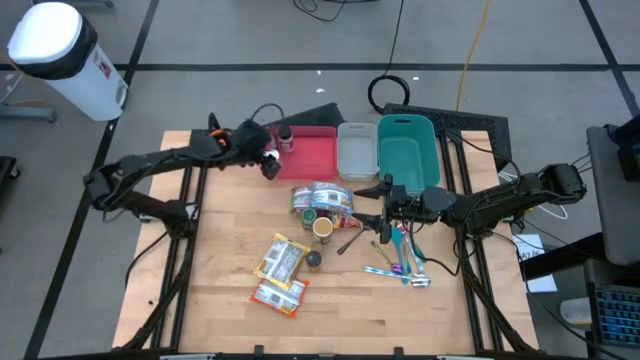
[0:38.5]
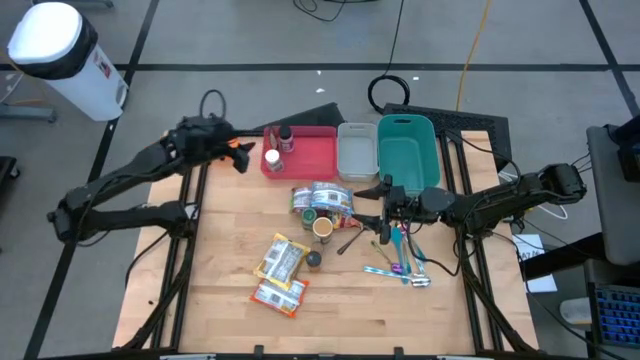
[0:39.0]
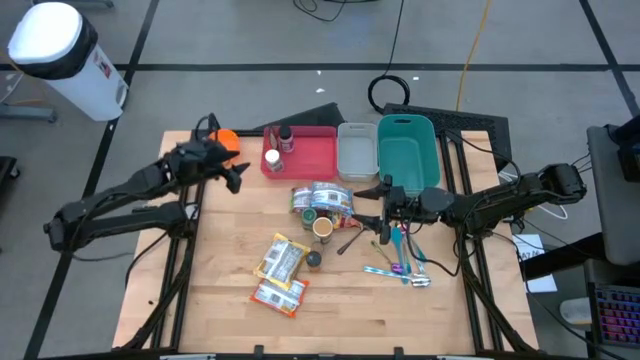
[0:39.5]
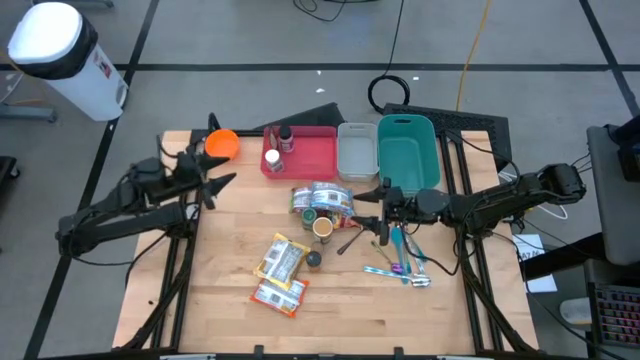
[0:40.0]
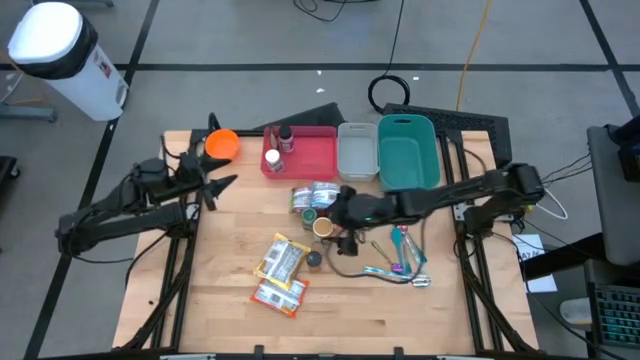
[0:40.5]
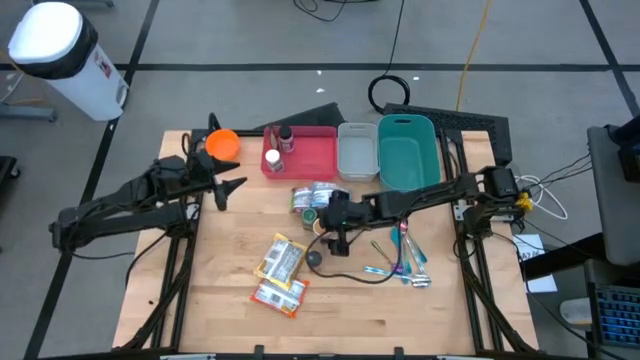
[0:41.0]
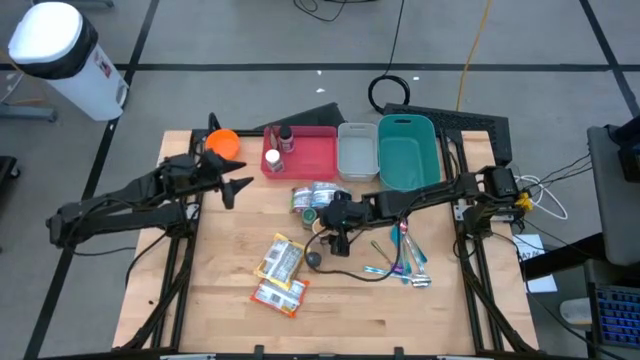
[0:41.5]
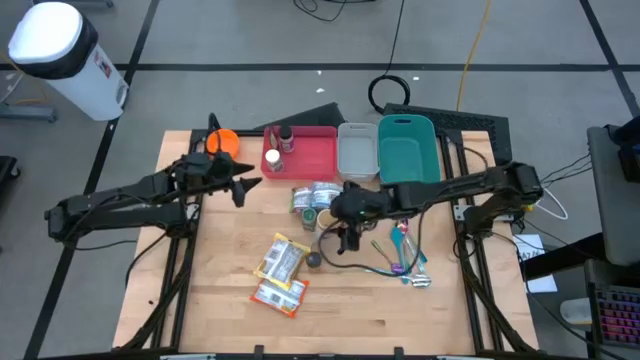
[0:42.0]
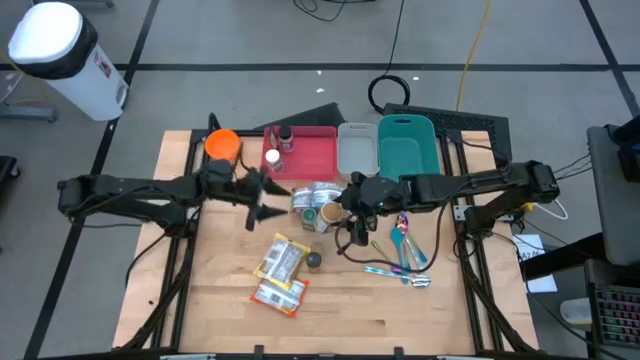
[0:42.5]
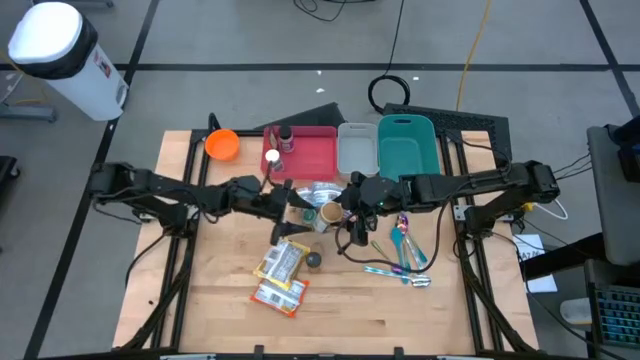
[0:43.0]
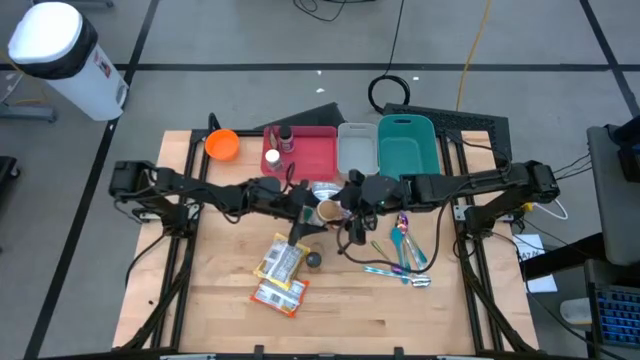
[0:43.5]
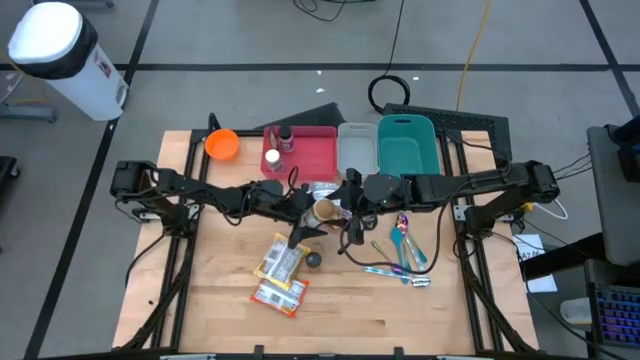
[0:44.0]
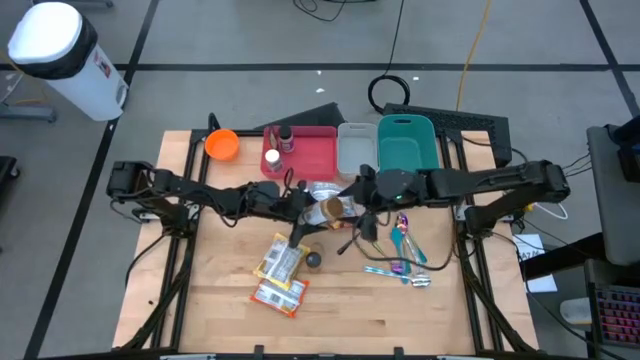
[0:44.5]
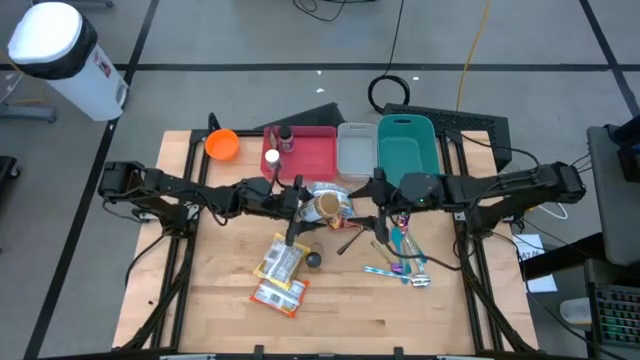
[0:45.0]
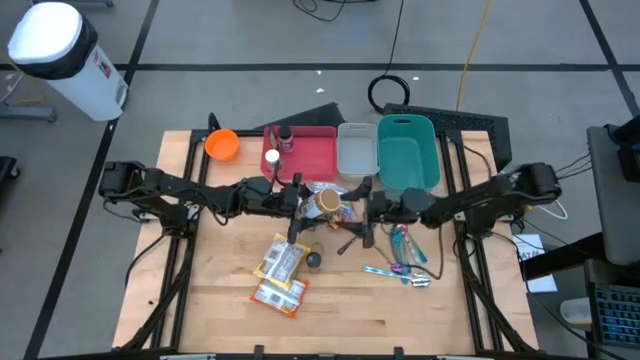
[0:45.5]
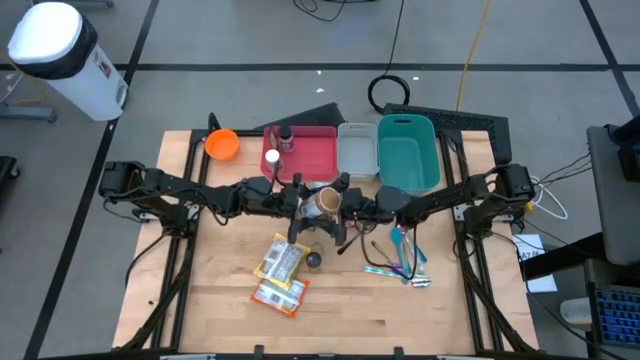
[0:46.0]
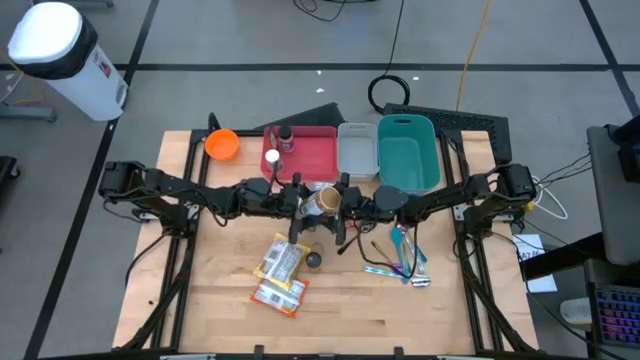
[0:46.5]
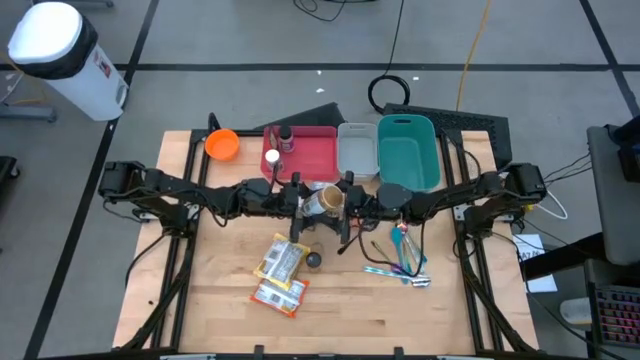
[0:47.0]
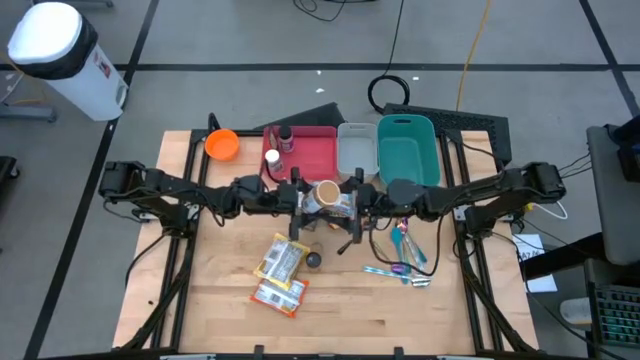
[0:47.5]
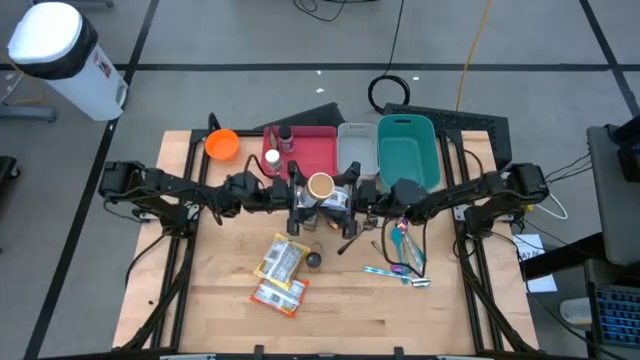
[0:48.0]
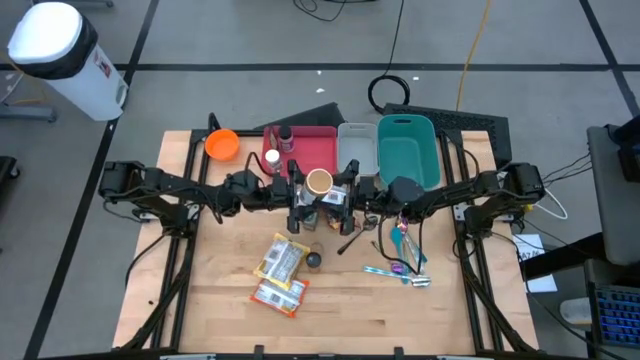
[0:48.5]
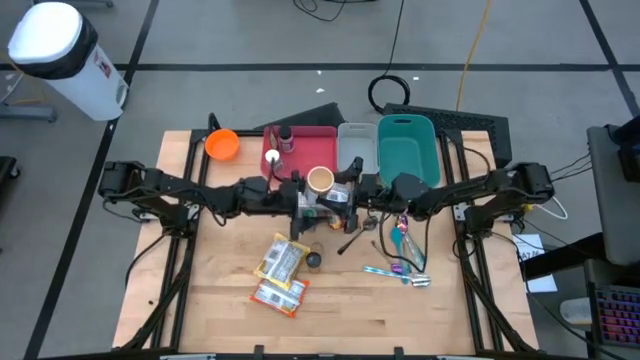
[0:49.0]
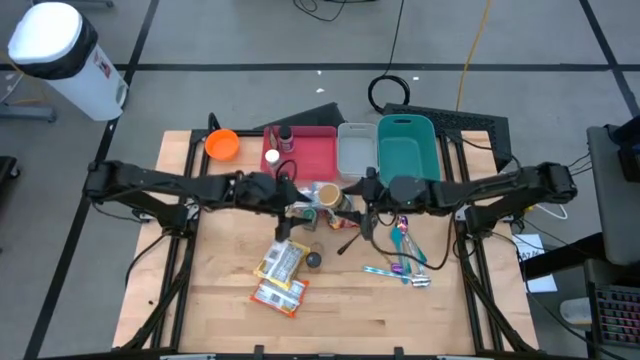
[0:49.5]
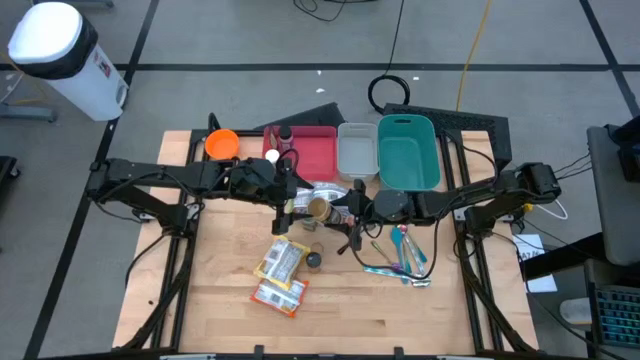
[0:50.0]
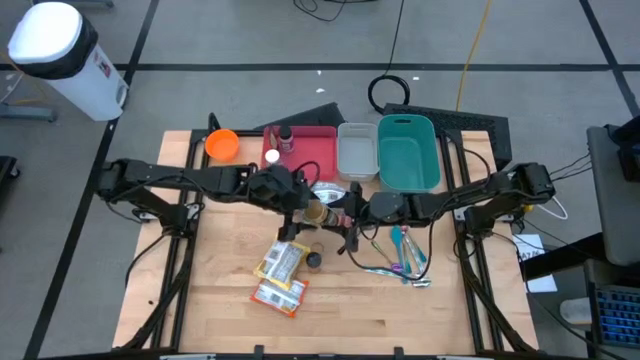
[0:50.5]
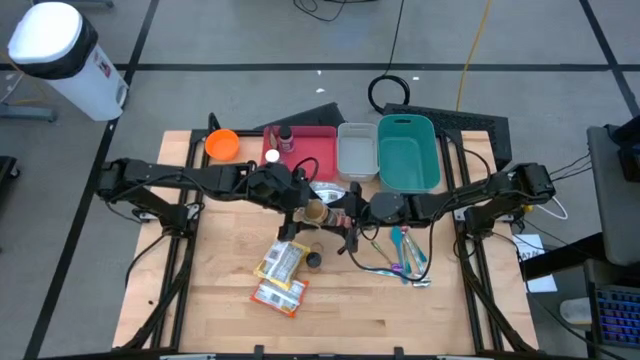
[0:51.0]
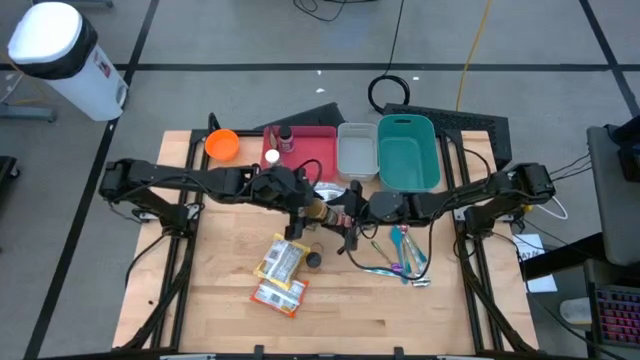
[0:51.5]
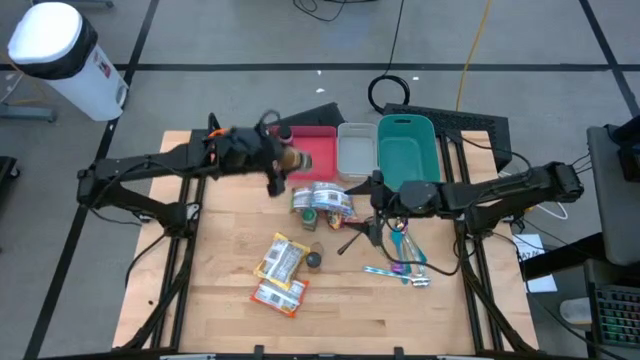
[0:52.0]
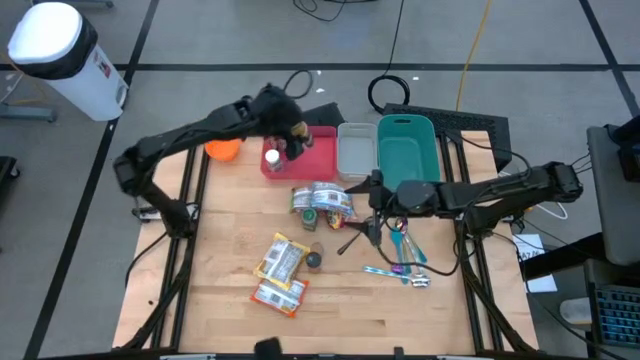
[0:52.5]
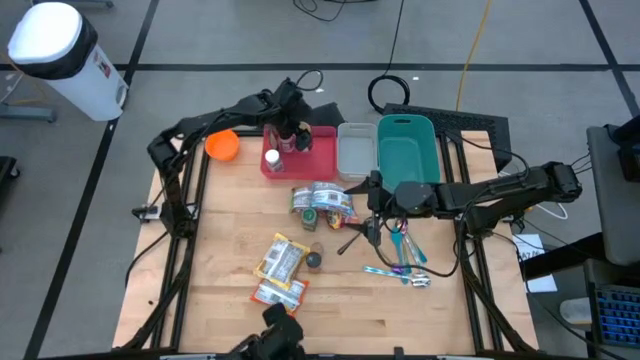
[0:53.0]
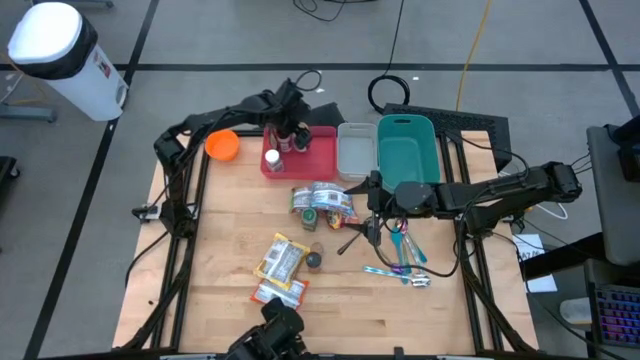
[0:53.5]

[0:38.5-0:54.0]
Task: Pick & Place Food Item
Put the gold seasoning bottle into the red bin

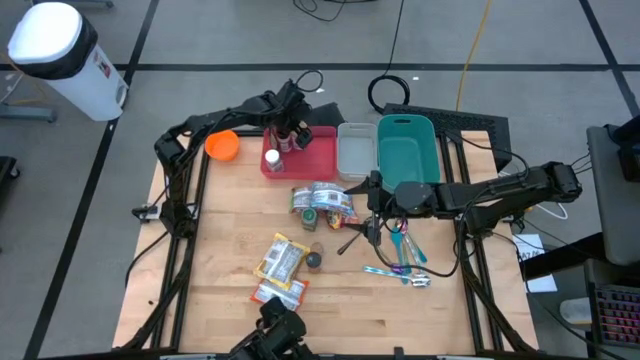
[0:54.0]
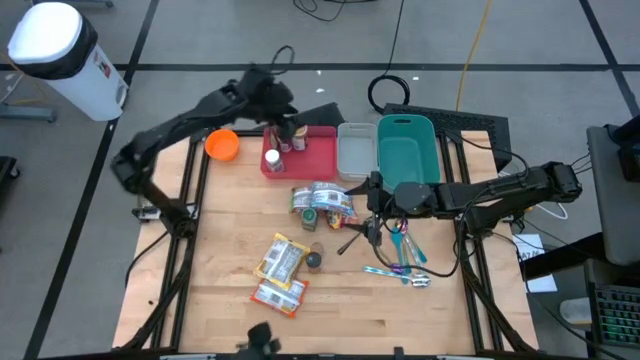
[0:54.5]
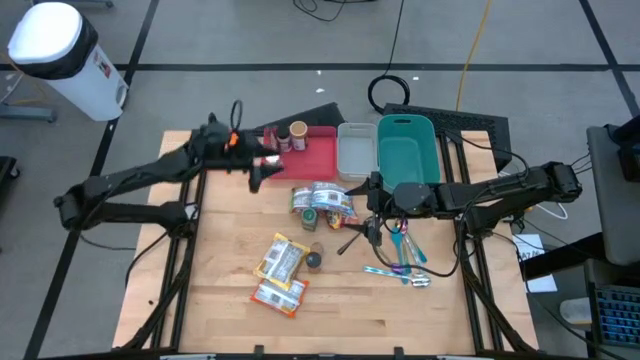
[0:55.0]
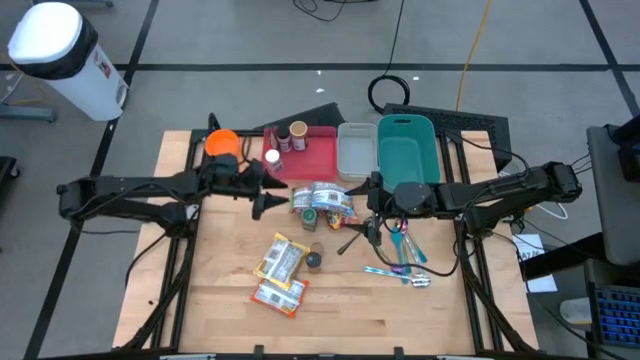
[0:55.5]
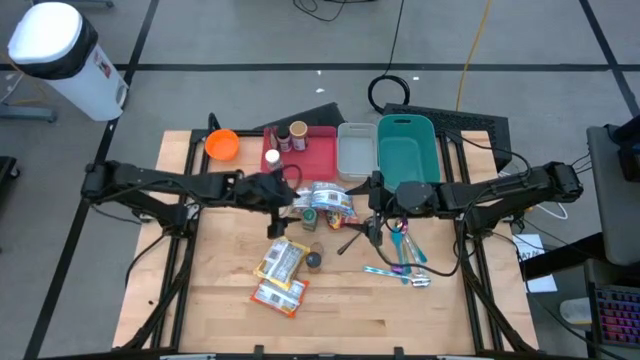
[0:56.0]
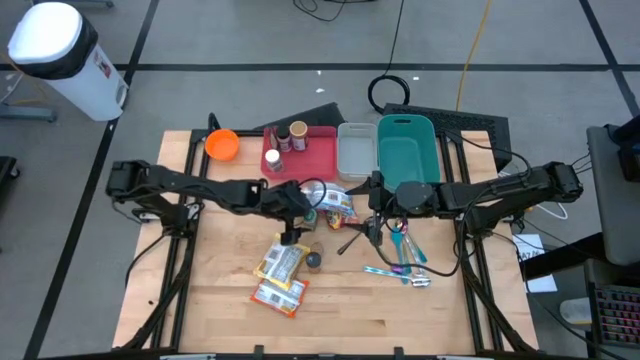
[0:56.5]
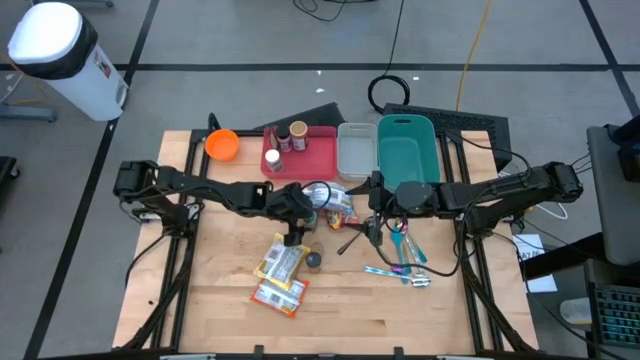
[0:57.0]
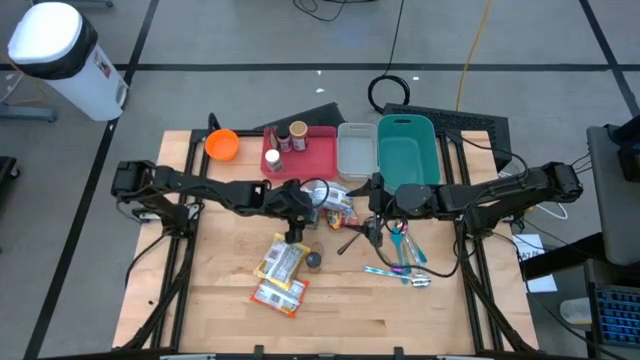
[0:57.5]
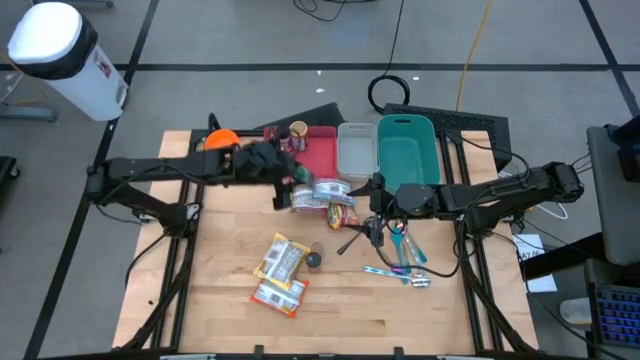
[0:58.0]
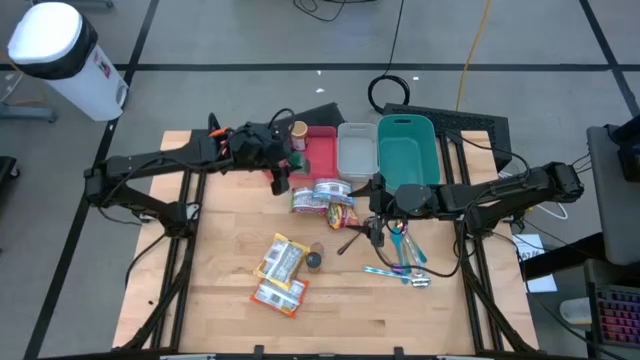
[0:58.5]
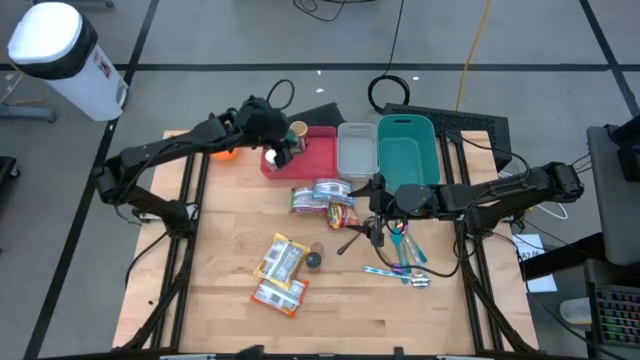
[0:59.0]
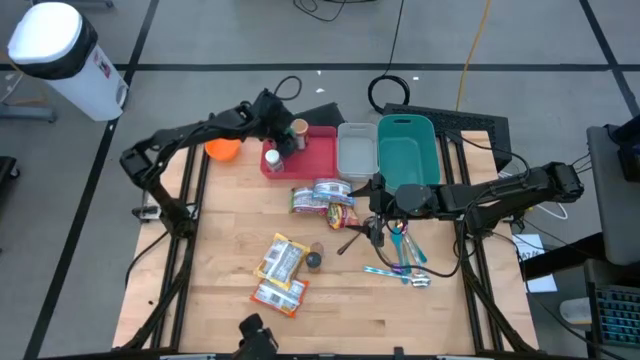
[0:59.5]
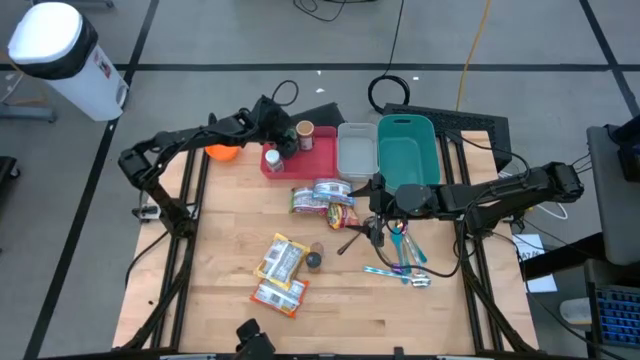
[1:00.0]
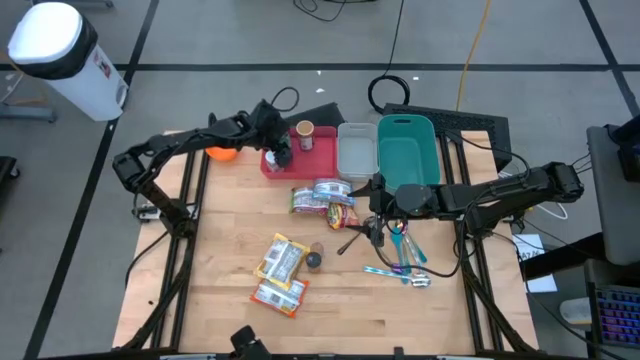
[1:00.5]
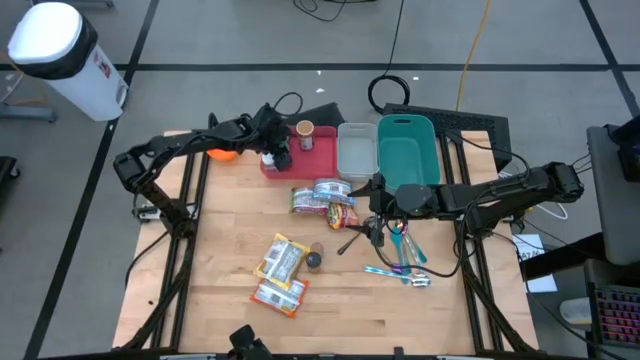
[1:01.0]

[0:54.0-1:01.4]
Put the green seasoning bottle into the red bin
